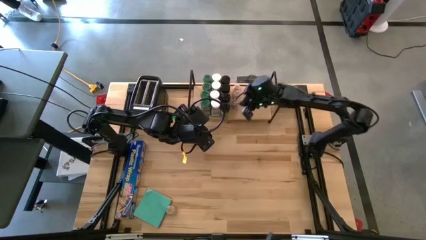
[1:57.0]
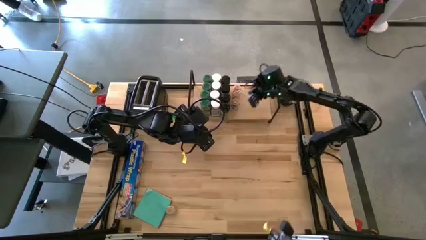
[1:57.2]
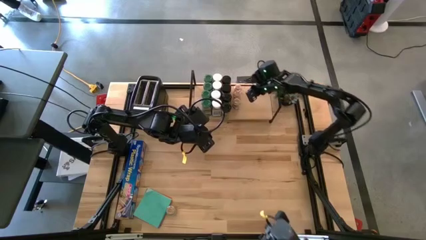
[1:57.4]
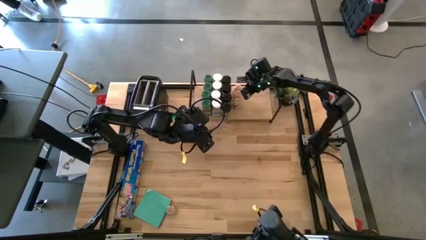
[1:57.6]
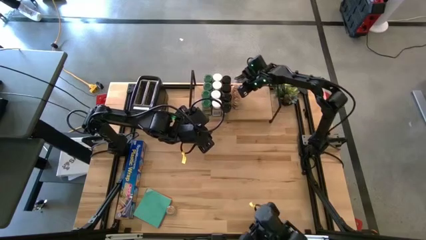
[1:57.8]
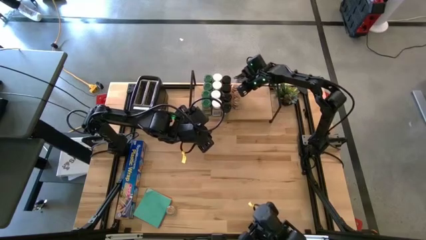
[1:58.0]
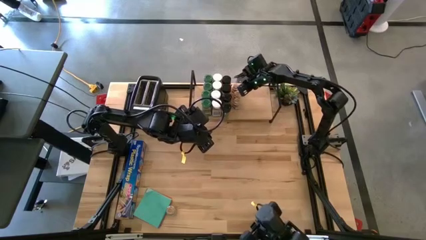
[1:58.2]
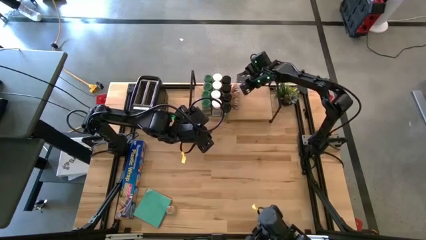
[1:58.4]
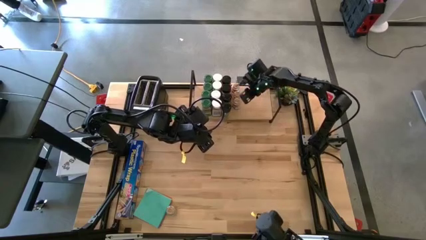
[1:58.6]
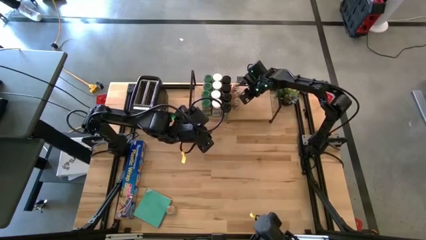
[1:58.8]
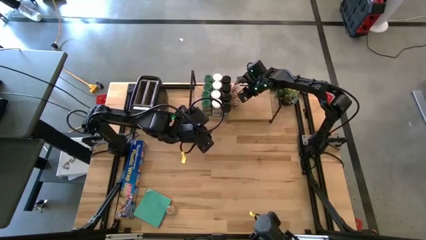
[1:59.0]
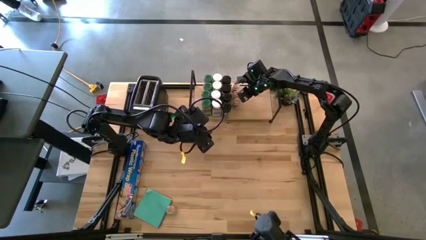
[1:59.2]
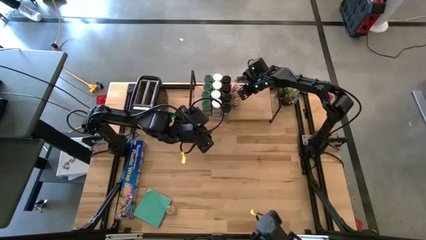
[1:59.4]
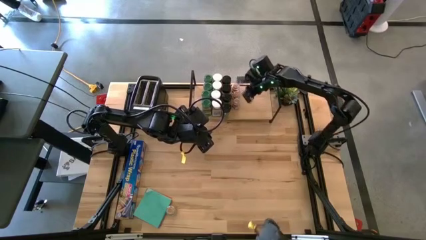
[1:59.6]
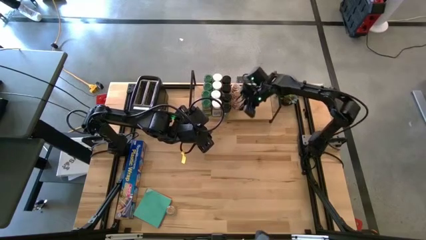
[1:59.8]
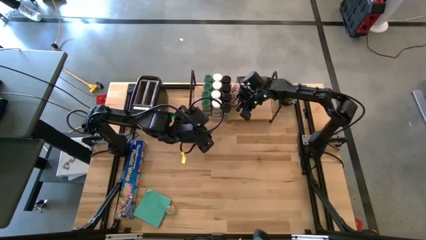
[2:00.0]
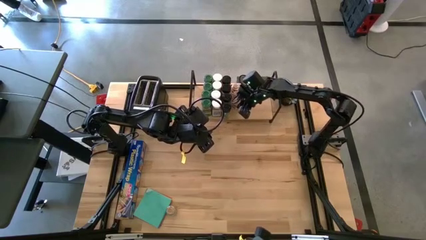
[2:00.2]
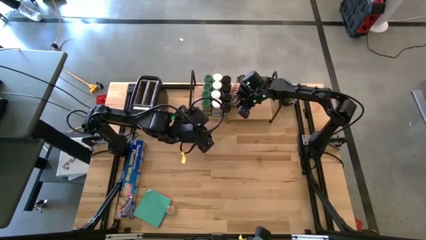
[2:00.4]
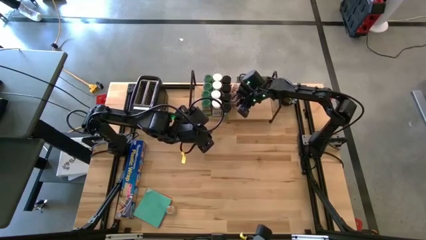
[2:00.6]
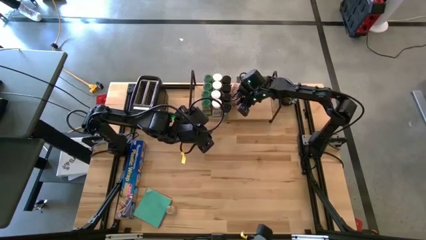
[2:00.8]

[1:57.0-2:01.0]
Task: Shelf spices
Adjust the transparent seasoning bottles on the back of the shelf

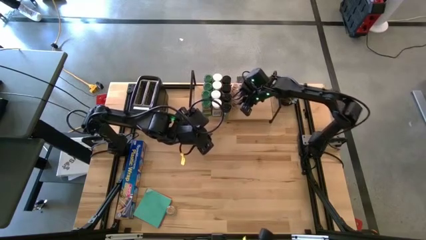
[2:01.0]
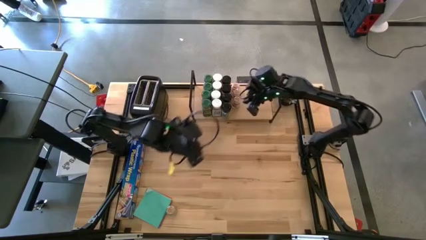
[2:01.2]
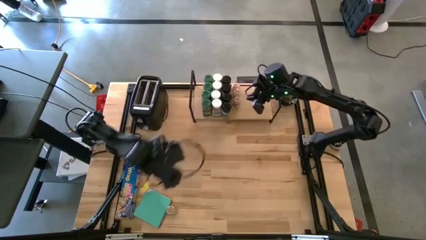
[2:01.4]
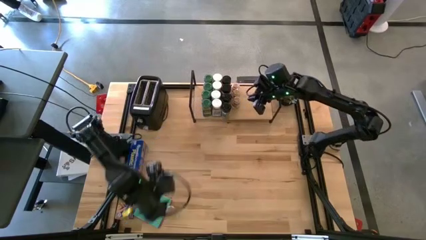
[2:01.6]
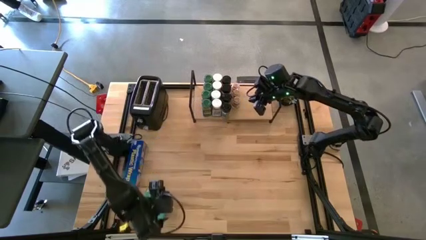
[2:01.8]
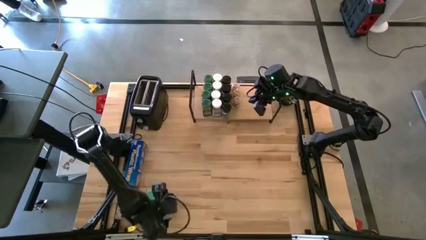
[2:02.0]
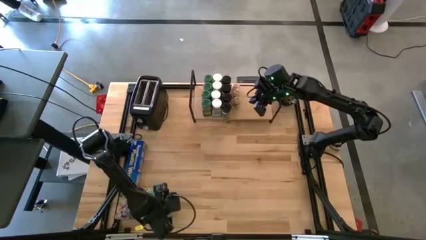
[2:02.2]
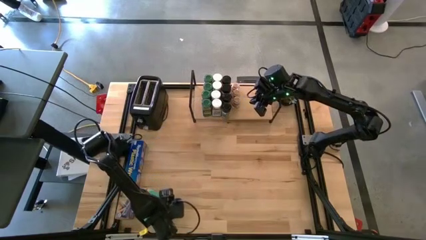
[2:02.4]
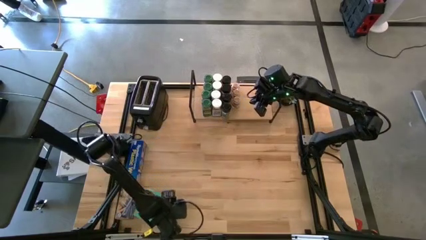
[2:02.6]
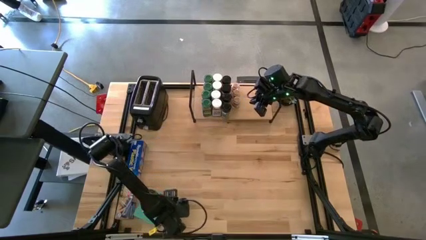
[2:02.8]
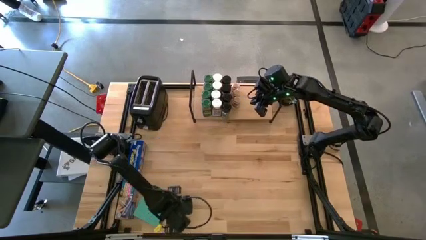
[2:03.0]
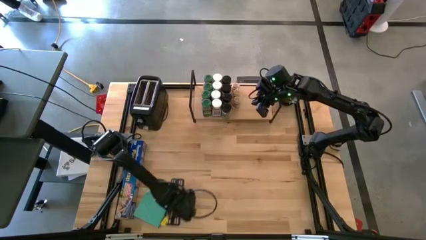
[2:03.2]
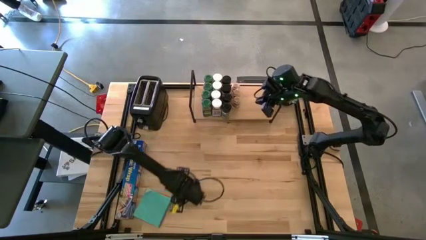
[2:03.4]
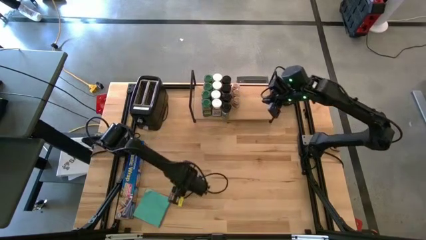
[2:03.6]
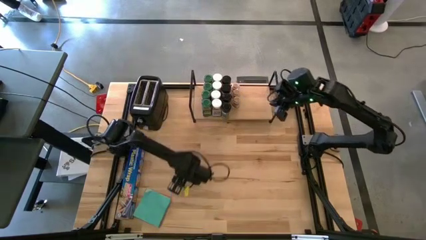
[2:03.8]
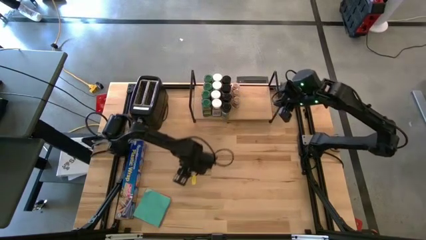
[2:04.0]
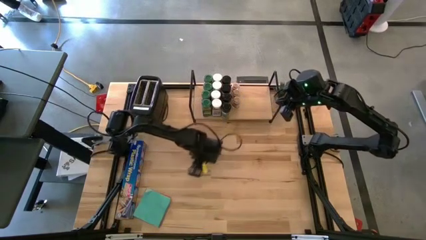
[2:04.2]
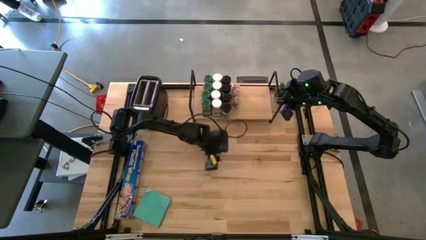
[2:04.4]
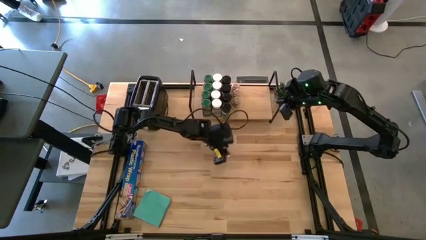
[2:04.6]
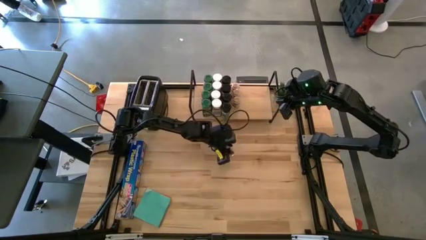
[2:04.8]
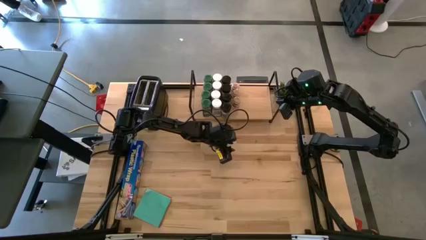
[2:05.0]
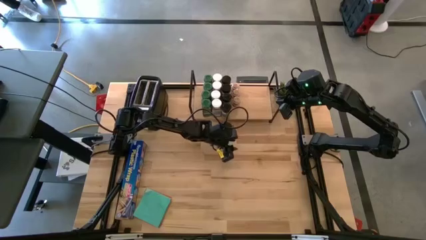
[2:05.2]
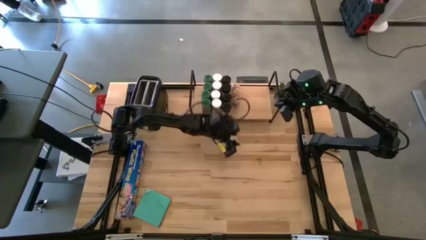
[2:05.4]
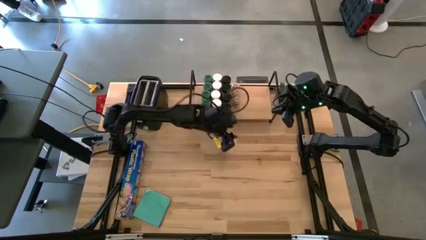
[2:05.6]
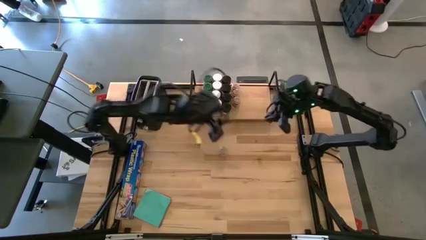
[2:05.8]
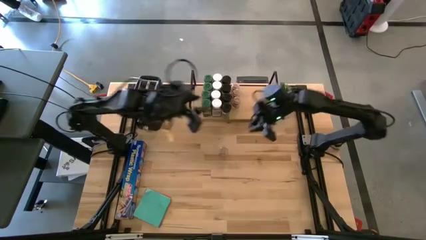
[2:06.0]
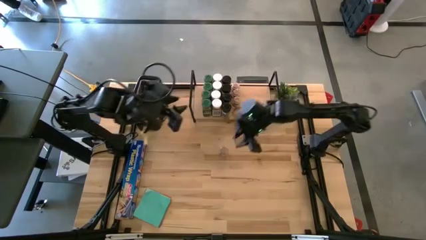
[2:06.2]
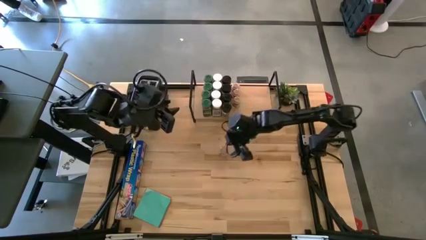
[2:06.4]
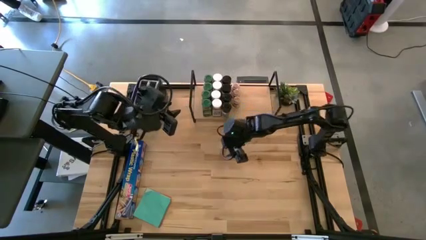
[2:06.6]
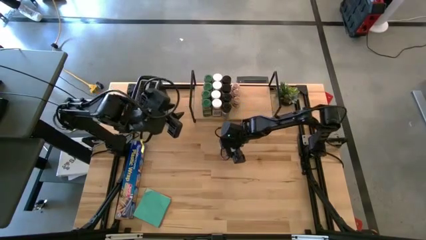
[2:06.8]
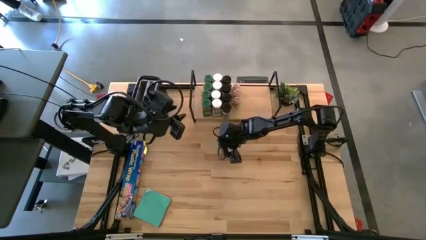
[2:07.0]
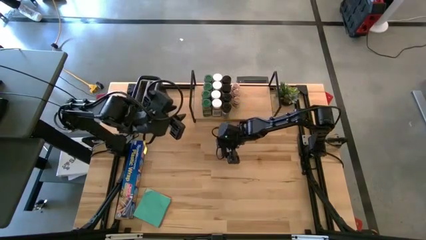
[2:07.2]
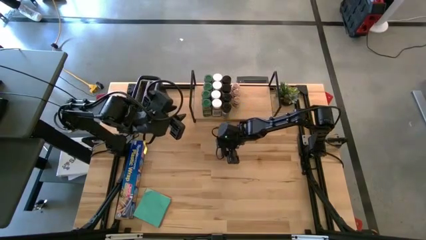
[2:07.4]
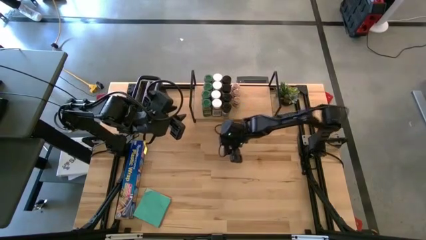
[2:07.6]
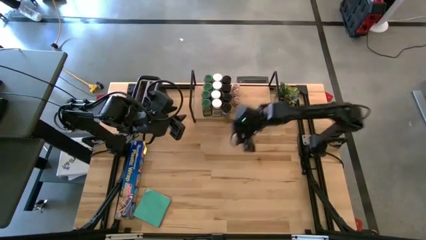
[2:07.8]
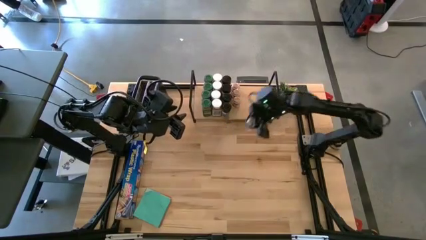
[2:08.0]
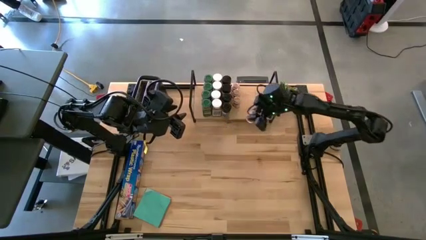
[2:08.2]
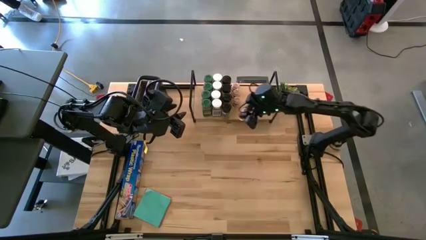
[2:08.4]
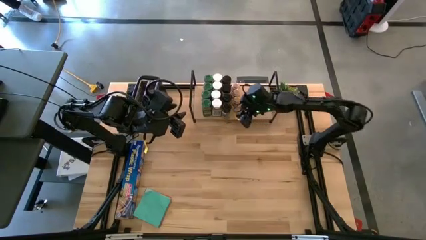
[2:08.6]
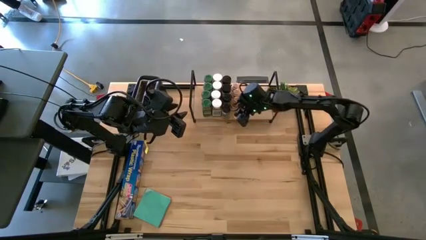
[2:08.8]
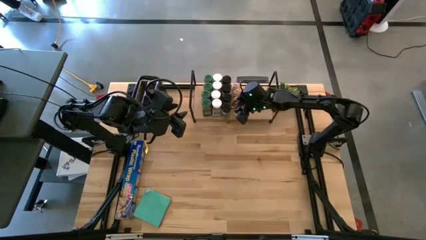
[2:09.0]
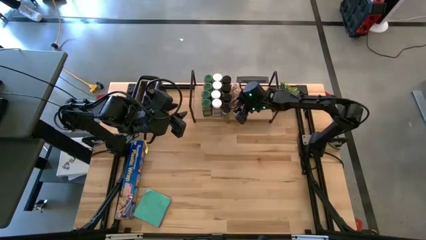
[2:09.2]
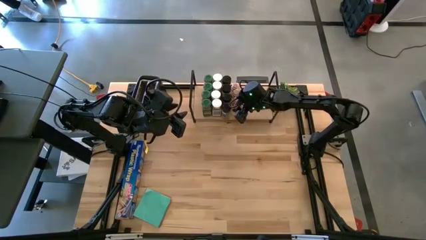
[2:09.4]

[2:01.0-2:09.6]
Put the transparent seasoning bottle on the shelf aligned with the other transparent seasoning bottles

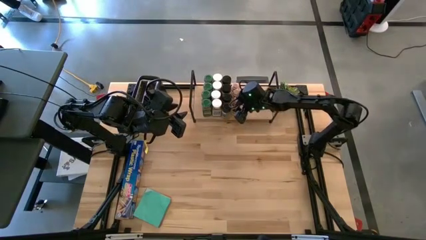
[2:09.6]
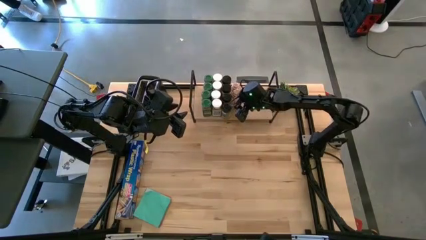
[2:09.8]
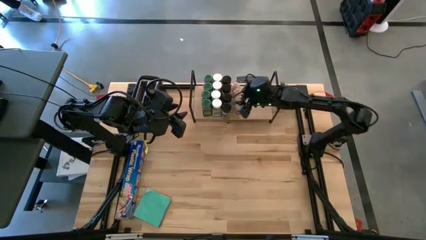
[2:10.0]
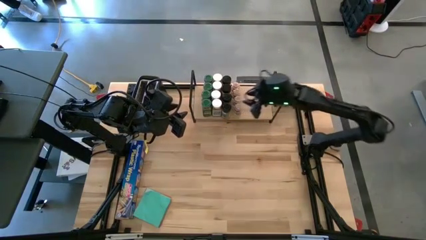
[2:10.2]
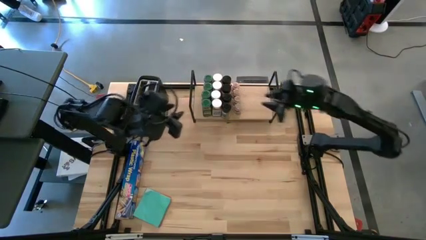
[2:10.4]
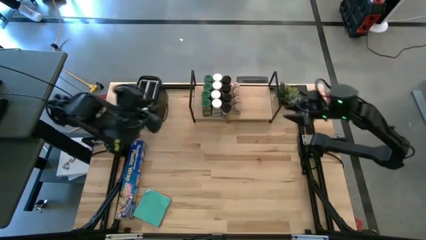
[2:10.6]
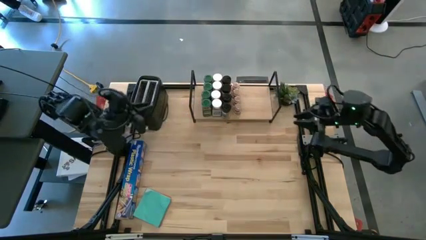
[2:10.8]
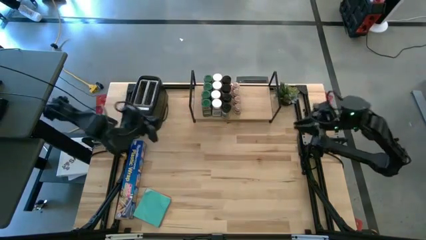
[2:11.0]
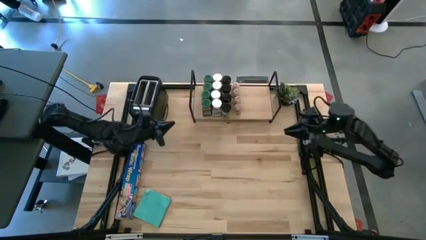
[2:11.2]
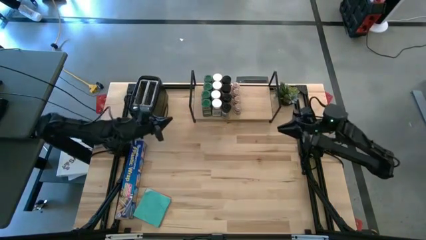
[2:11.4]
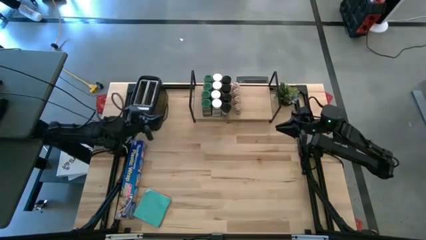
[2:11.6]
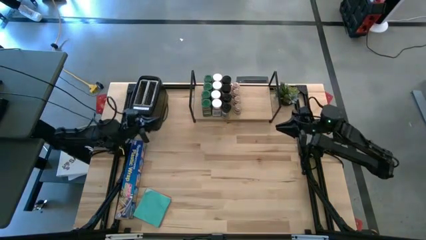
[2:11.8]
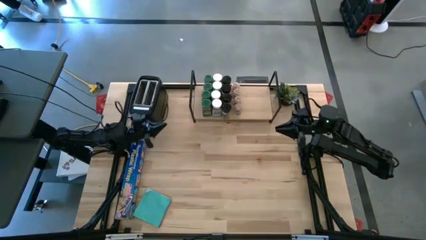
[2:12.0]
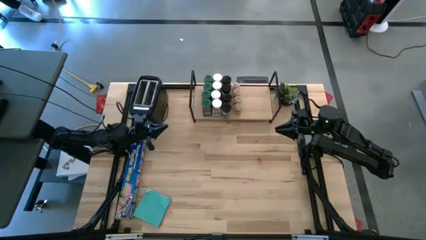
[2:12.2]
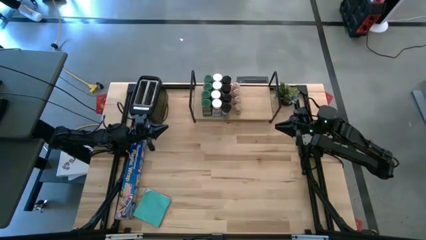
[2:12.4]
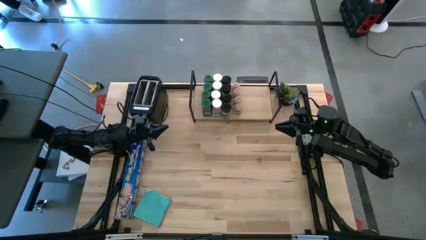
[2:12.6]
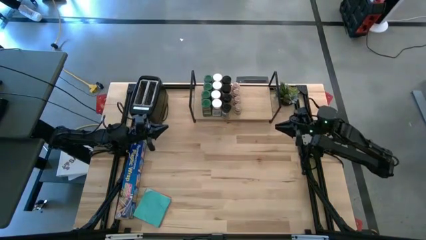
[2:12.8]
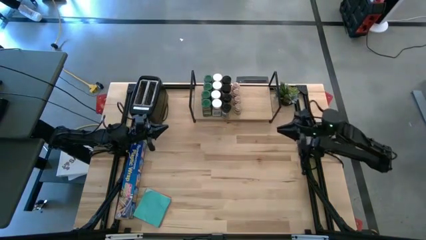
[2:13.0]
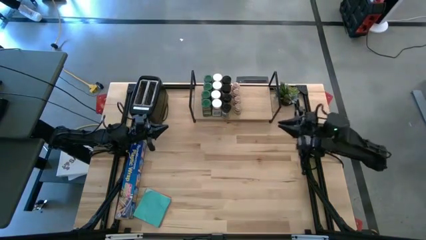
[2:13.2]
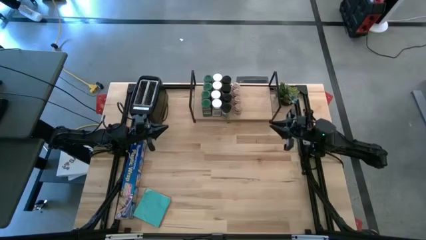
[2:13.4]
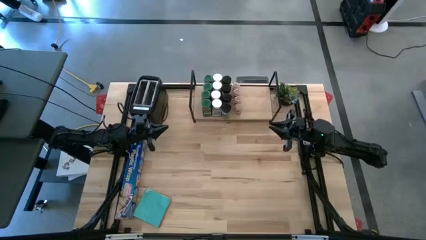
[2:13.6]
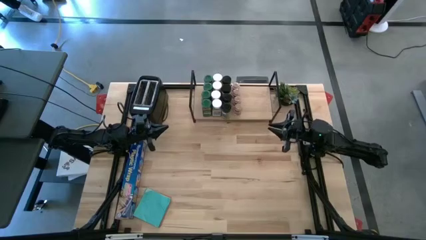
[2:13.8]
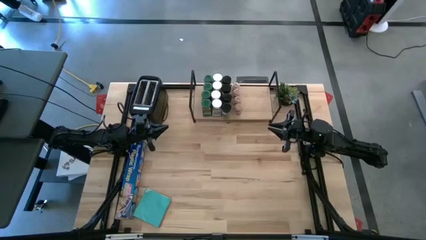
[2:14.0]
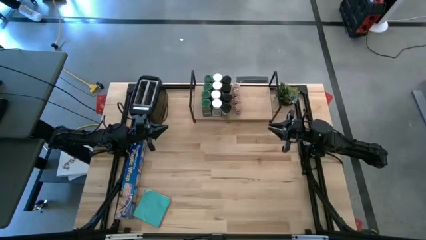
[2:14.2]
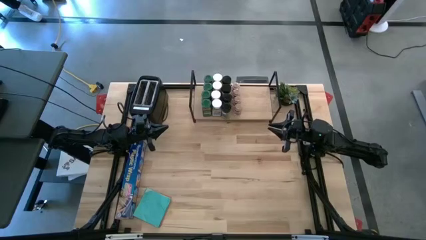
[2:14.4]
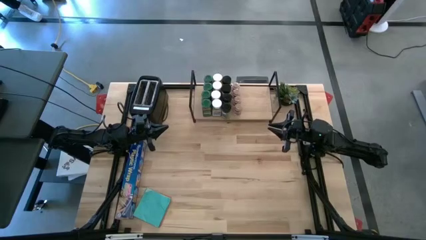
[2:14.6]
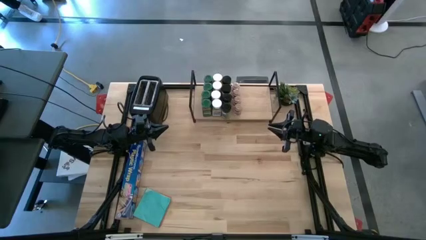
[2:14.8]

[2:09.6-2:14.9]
Return to Home Position
